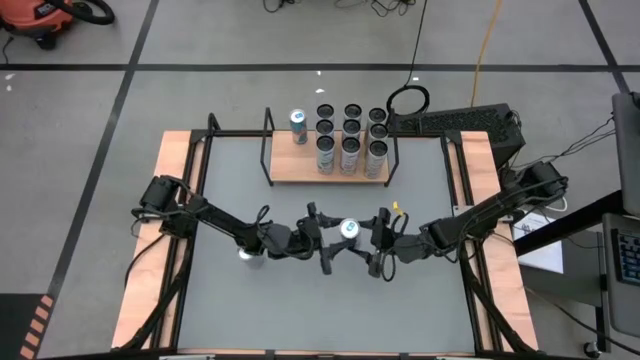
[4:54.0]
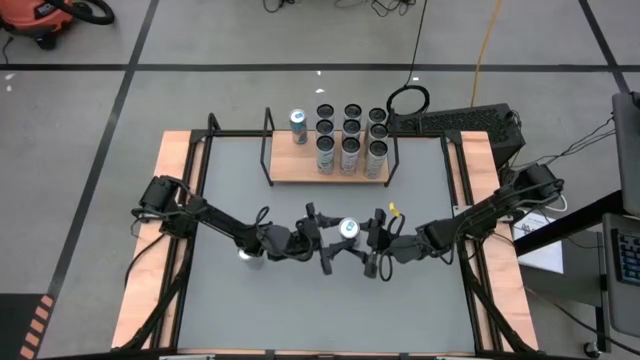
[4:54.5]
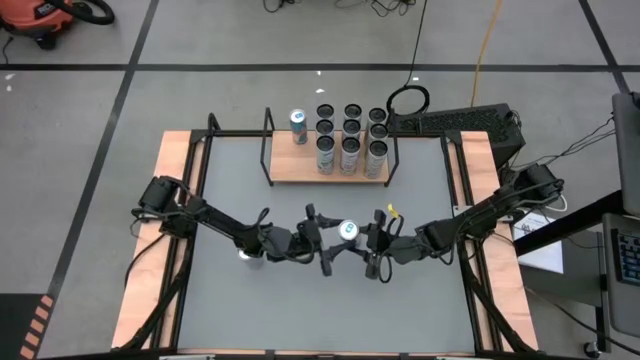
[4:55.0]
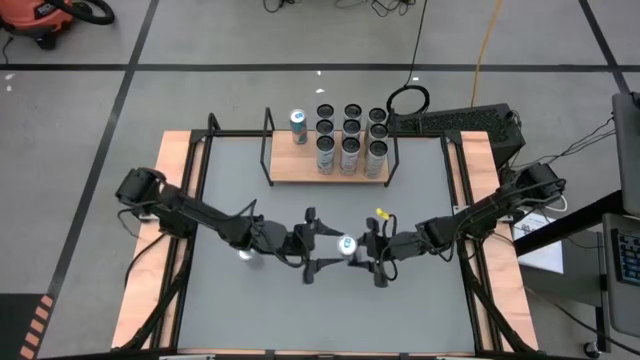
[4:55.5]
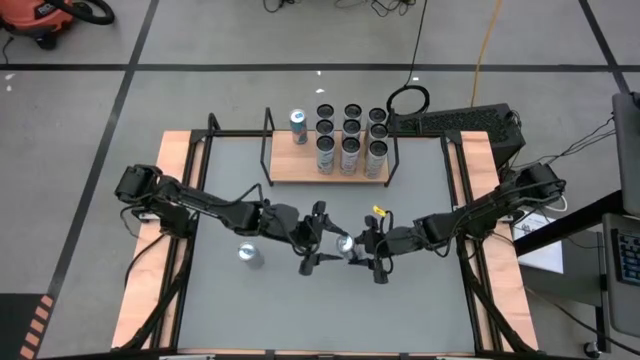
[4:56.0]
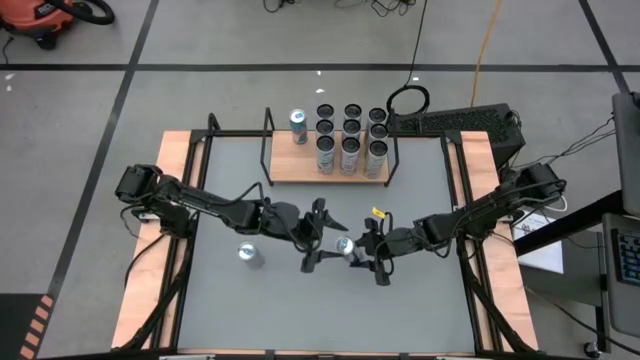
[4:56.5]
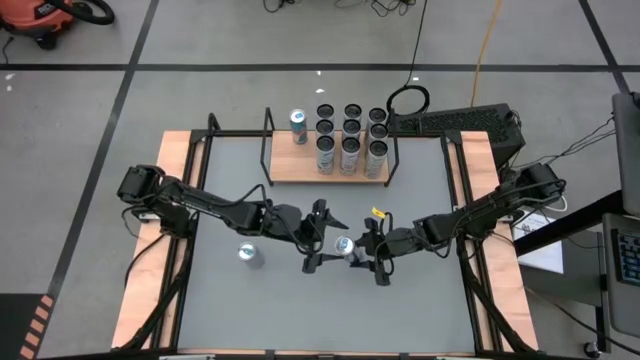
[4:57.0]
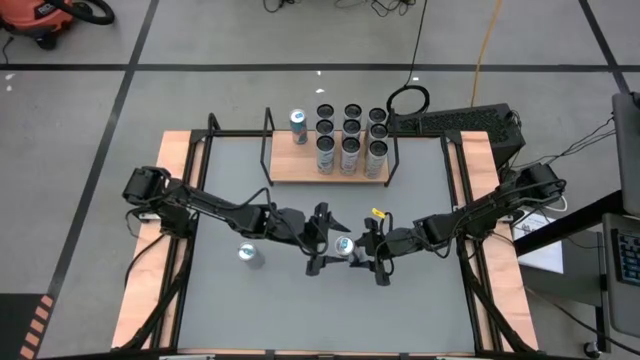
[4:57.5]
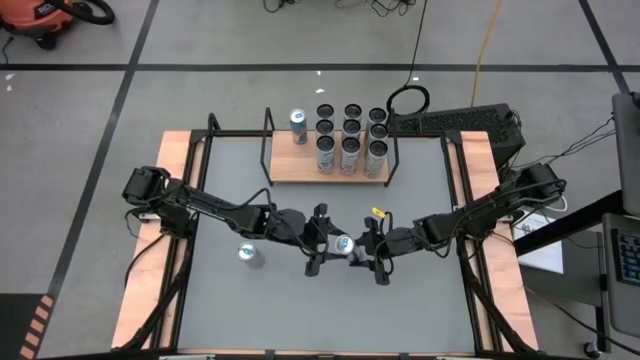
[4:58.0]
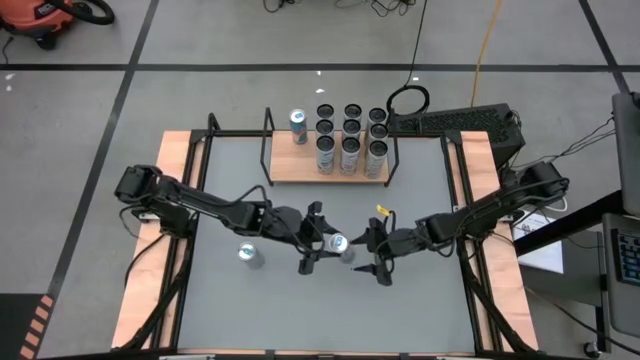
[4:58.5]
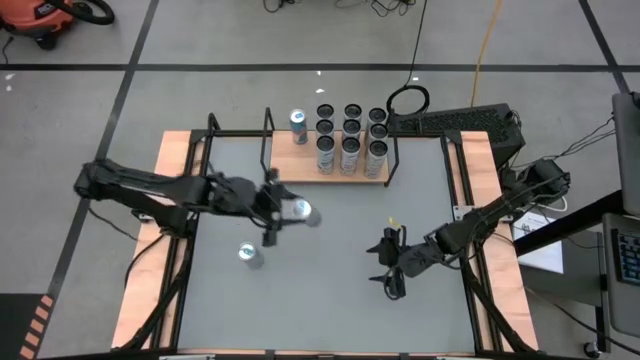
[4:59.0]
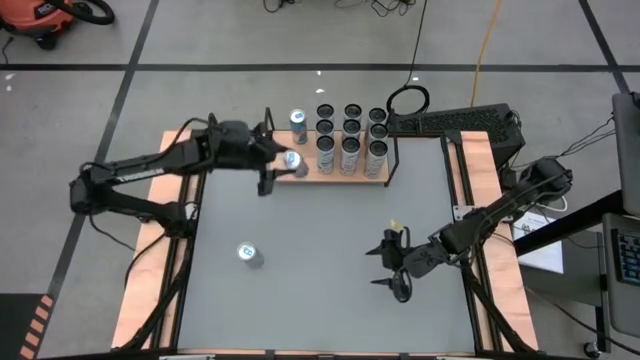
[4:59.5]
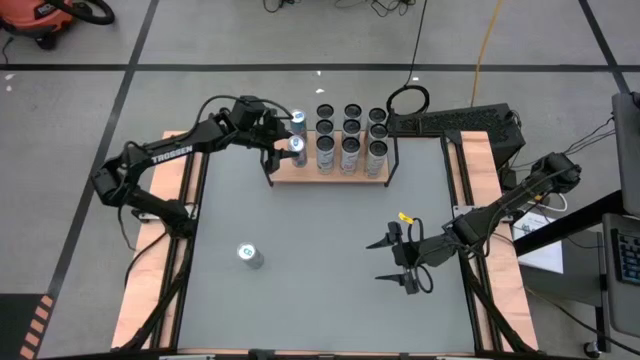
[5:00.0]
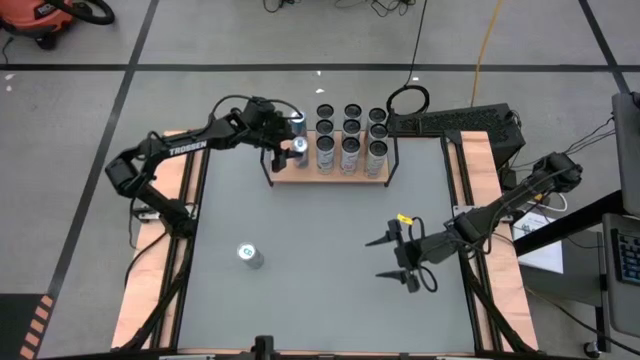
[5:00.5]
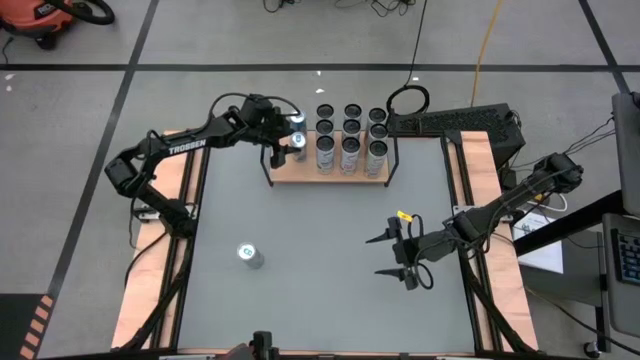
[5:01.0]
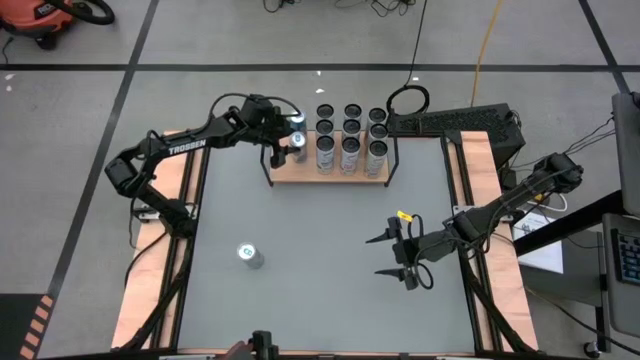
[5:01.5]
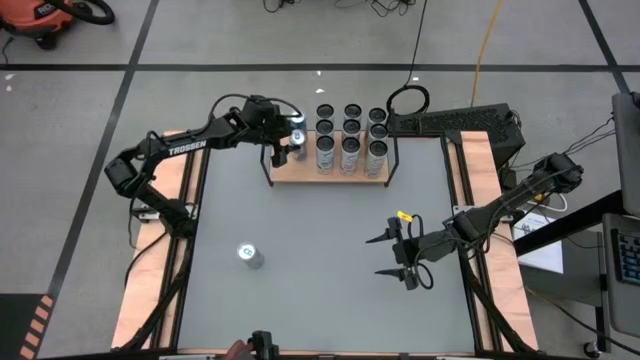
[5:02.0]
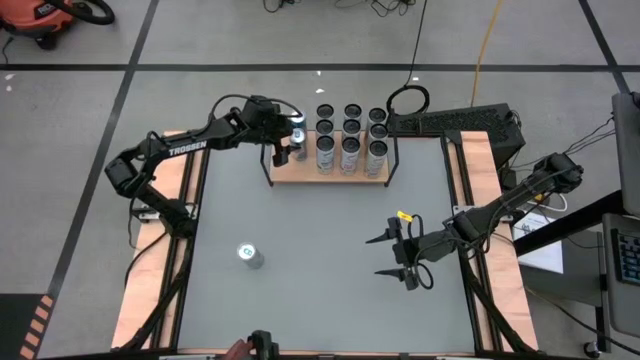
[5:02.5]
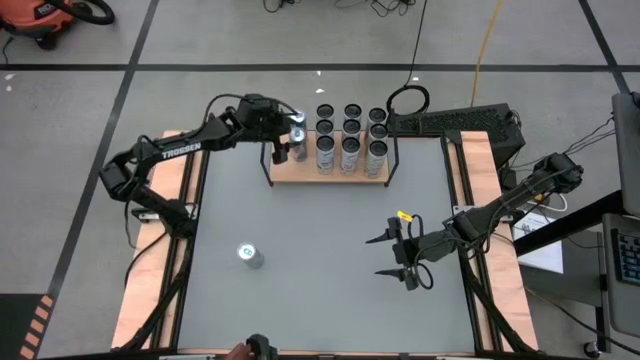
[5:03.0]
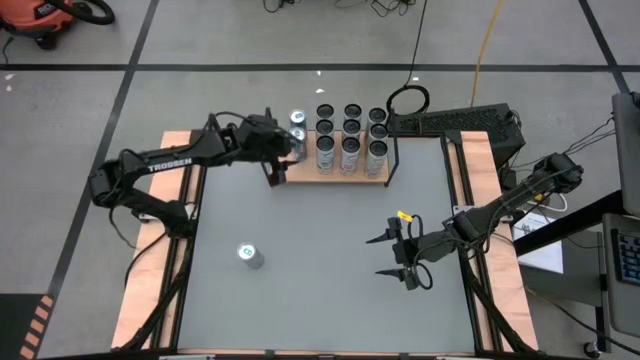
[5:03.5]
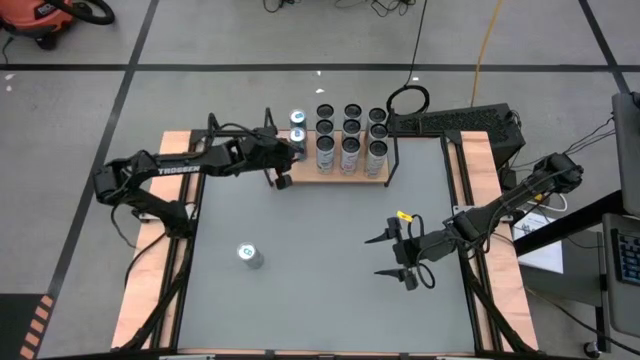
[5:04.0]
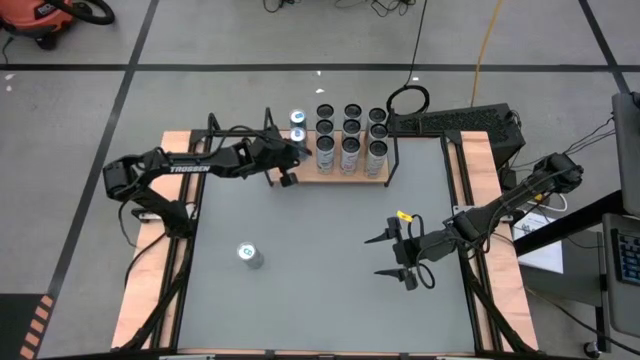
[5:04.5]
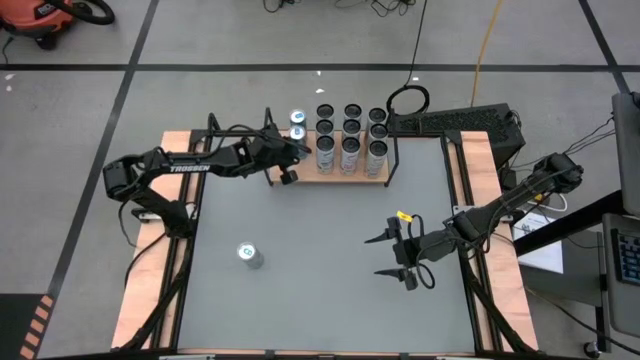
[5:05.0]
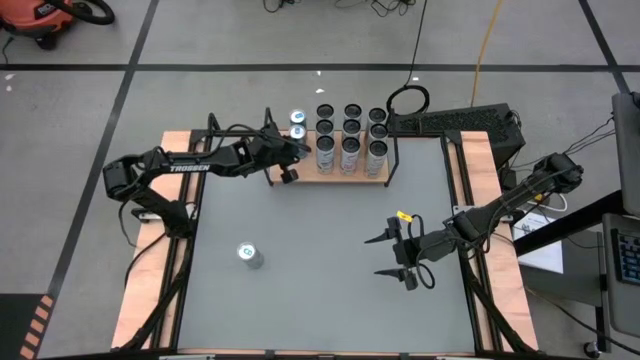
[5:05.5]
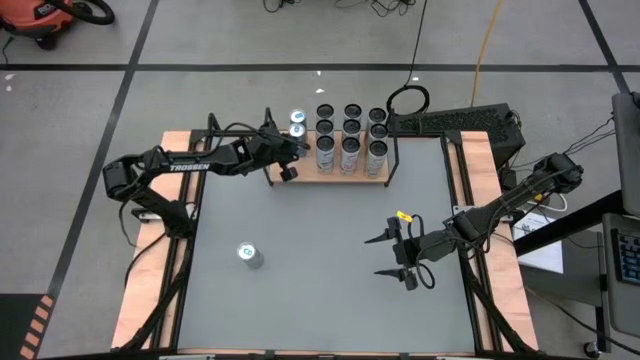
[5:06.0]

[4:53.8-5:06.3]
Task: Place canned beverage on shelf
Put the bottom blue soda can on the shelf aligned with the blue soda can

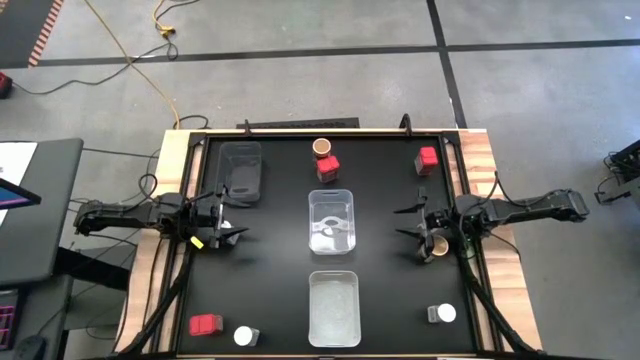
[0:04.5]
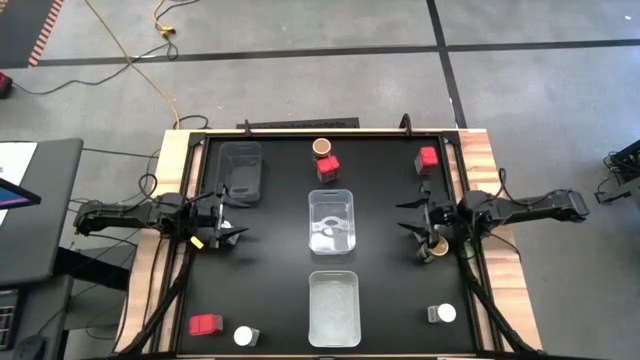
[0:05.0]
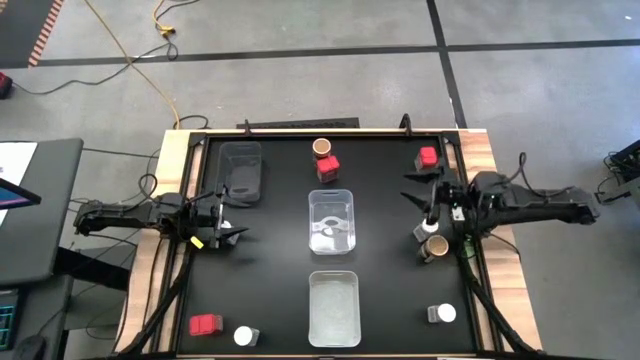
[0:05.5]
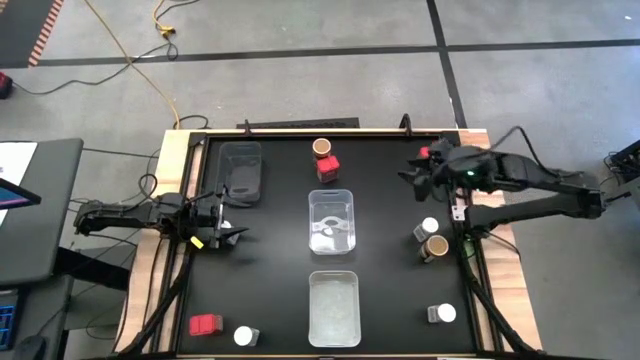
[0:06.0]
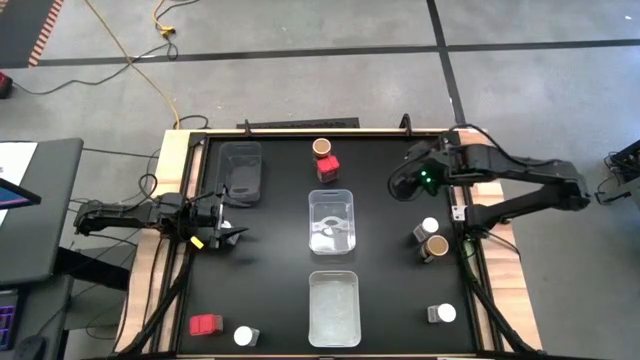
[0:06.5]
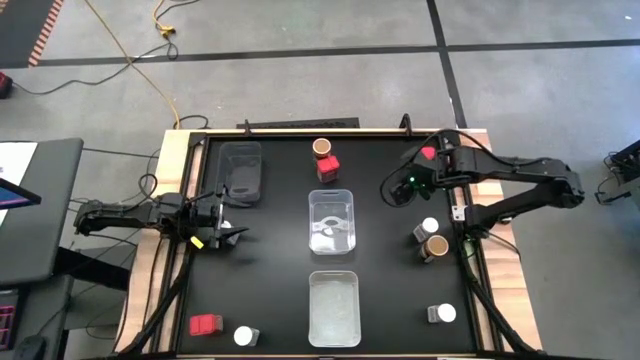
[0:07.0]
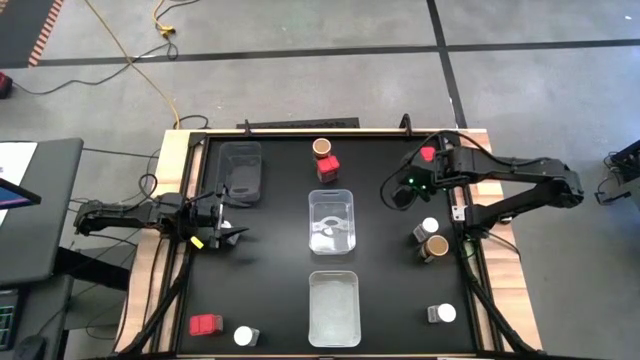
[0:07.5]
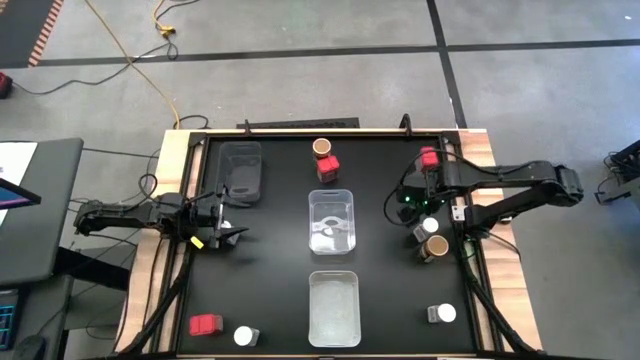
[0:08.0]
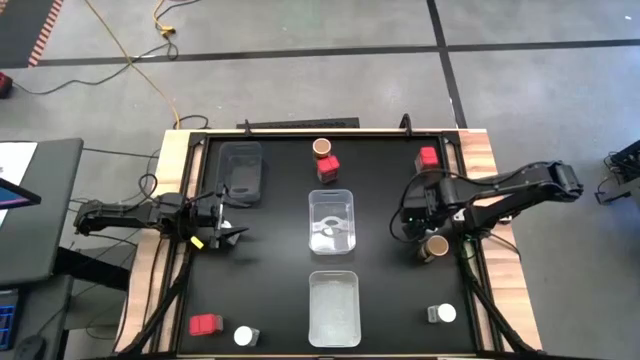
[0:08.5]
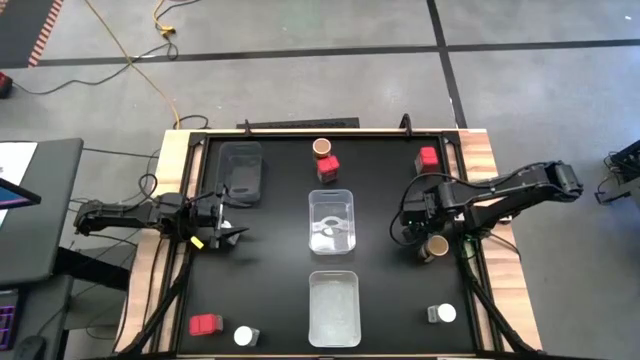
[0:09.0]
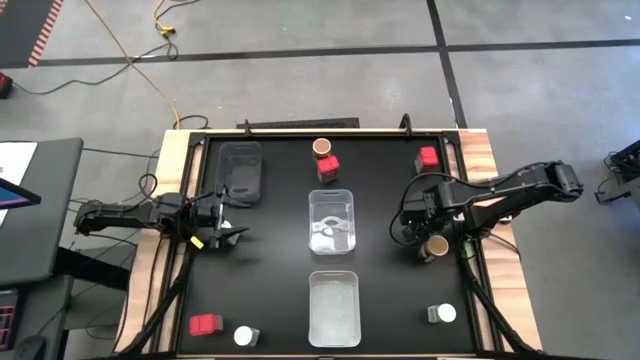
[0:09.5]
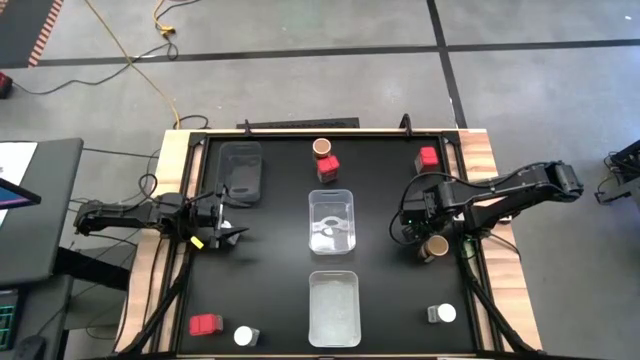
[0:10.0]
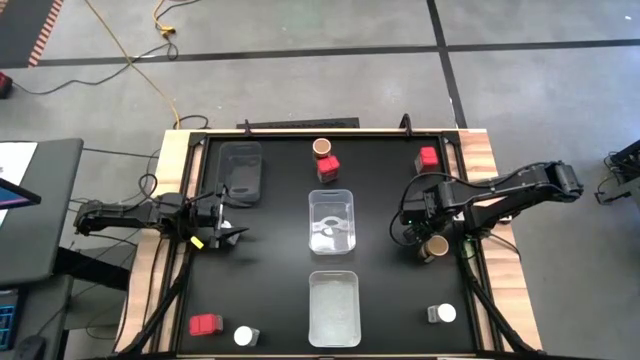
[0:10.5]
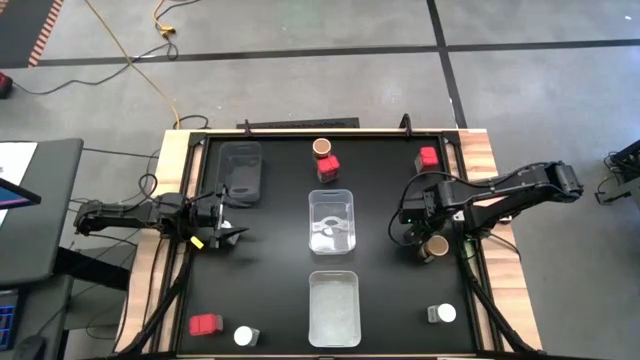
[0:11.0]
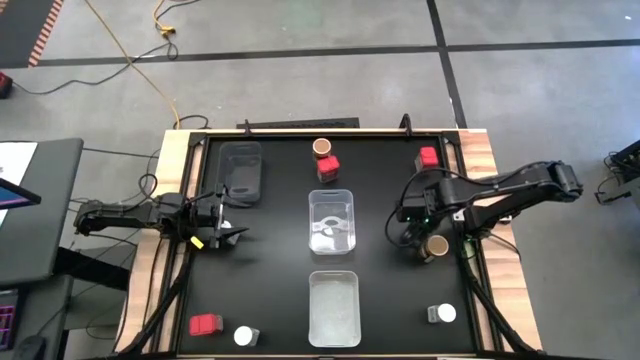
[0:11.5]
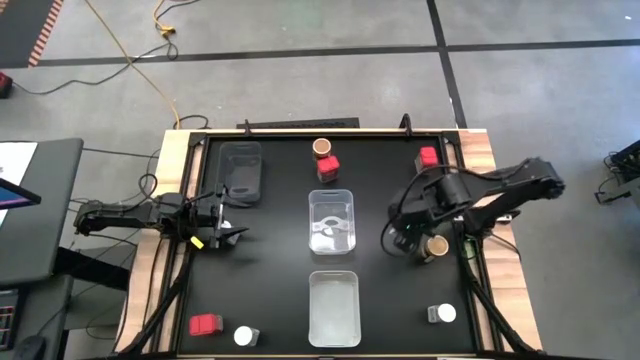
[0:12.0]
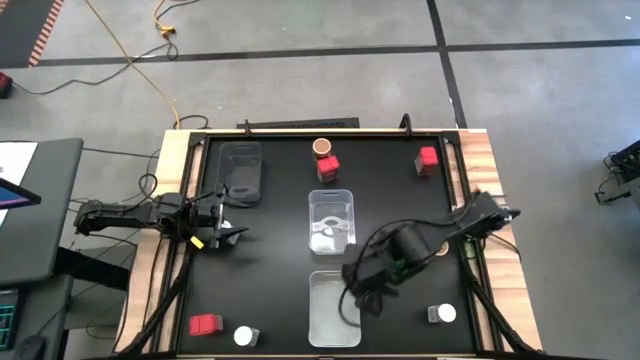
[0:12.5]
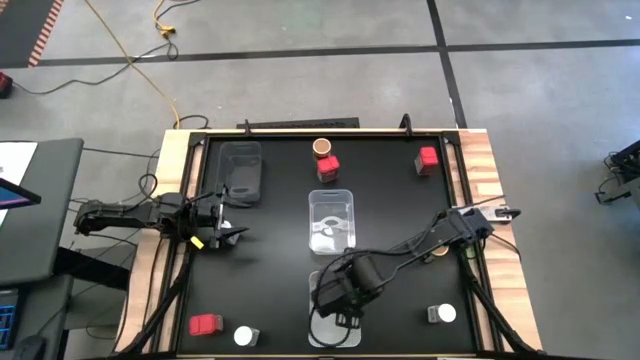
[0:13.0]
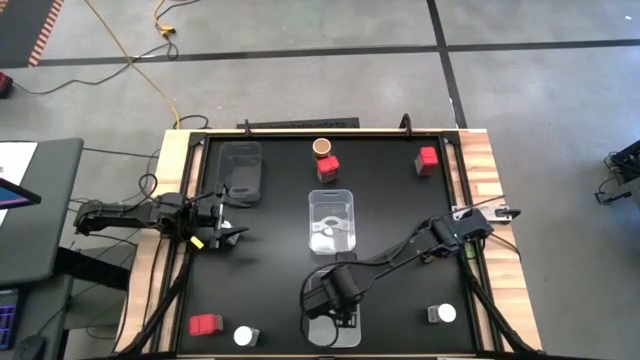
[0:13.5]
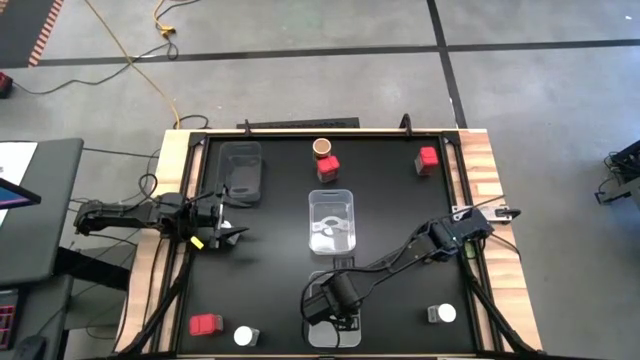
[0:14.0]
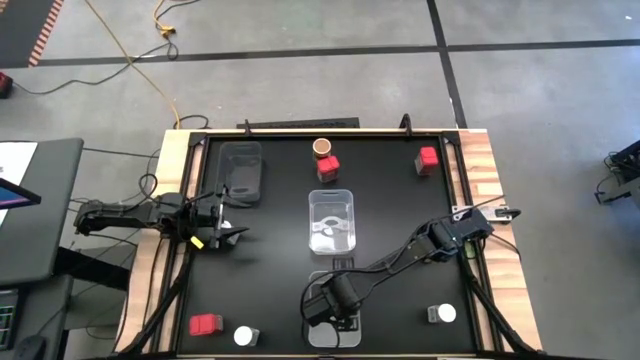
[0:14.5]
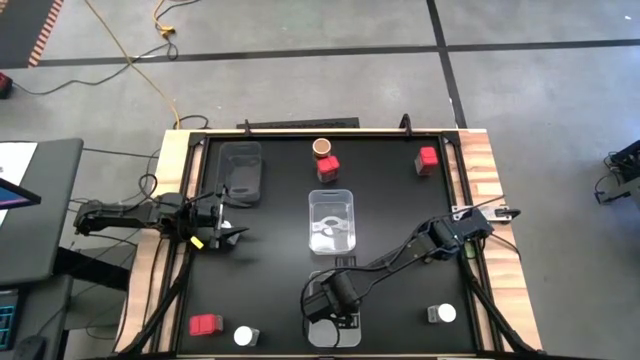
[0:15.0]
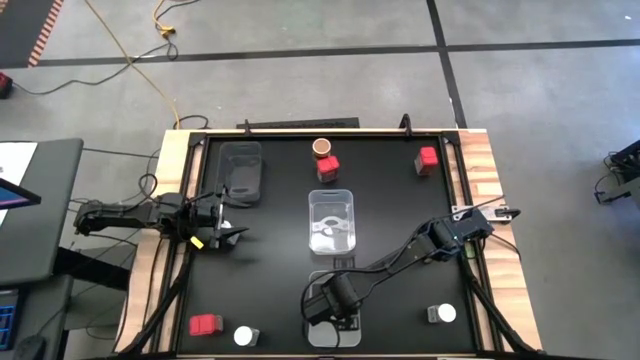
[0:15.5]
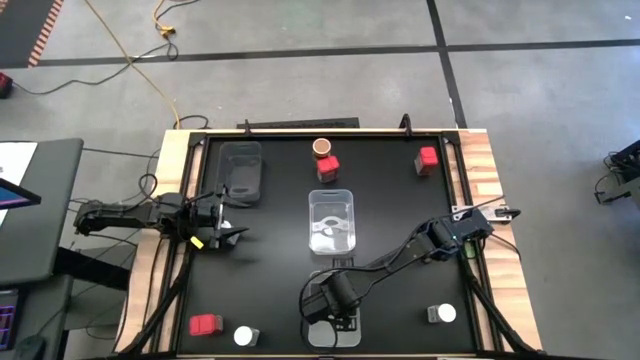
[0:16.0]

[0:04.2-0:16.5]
Task: Sort spices by type
Put the white seasoning bottle into the white bin
